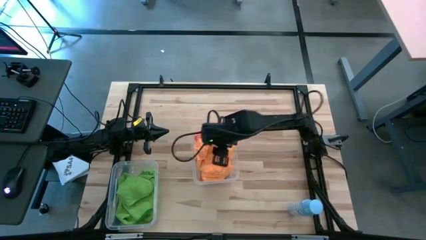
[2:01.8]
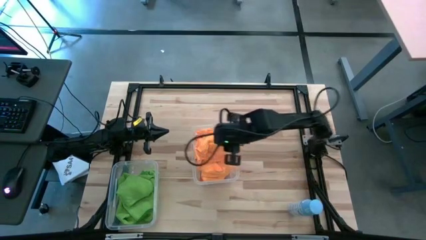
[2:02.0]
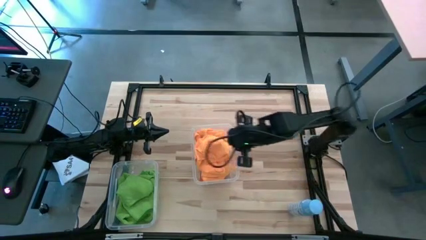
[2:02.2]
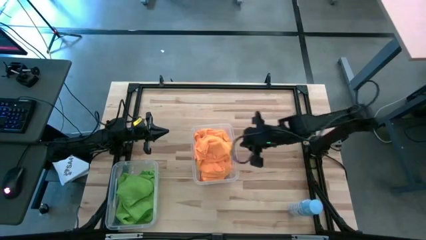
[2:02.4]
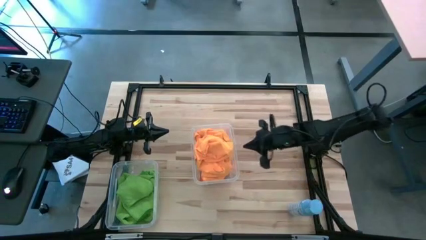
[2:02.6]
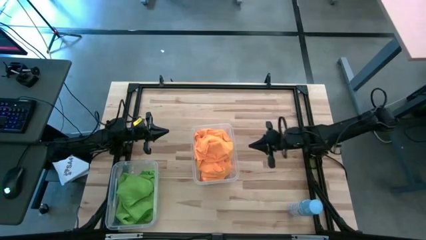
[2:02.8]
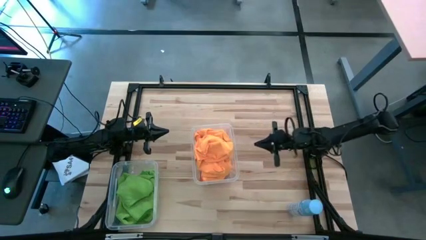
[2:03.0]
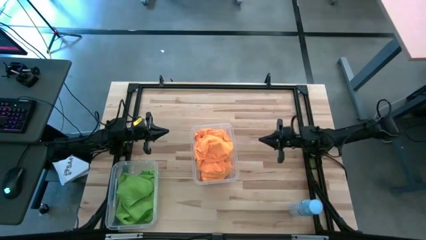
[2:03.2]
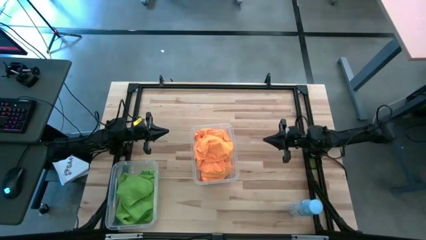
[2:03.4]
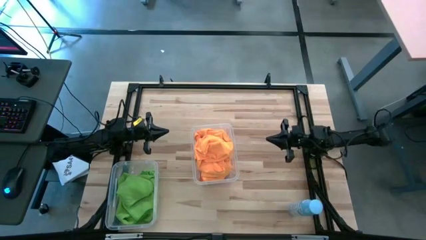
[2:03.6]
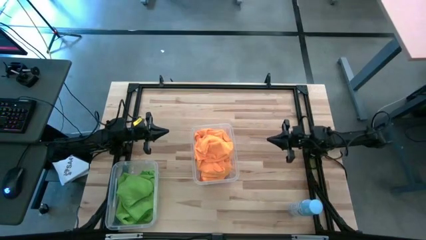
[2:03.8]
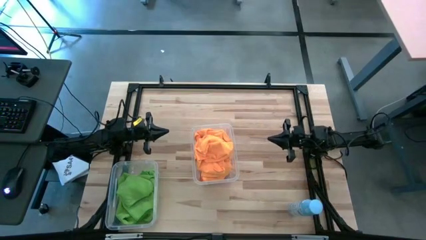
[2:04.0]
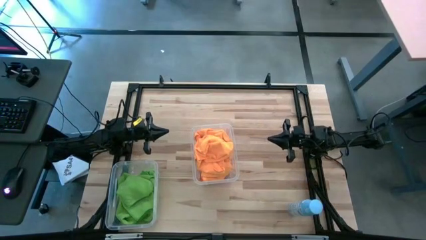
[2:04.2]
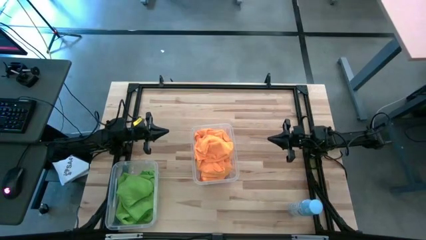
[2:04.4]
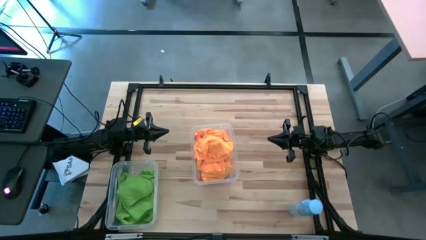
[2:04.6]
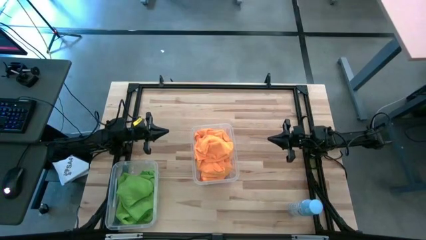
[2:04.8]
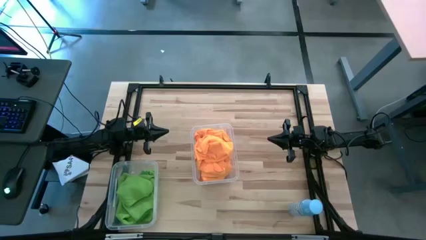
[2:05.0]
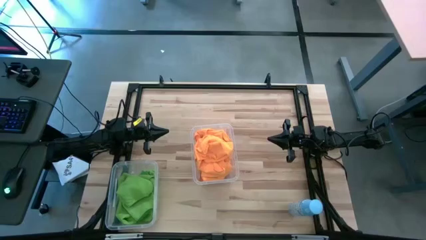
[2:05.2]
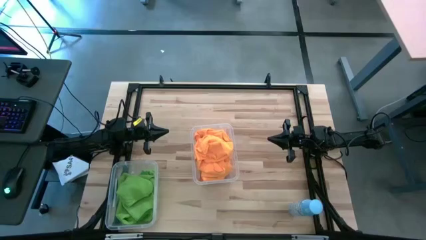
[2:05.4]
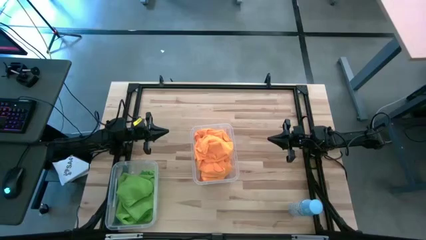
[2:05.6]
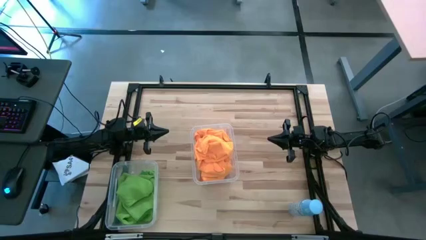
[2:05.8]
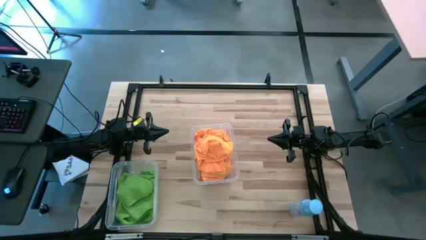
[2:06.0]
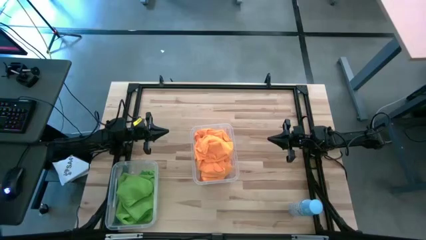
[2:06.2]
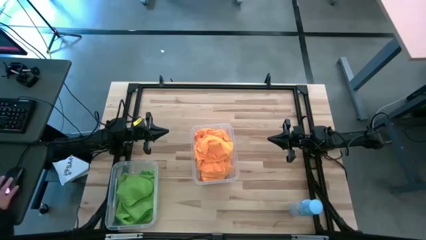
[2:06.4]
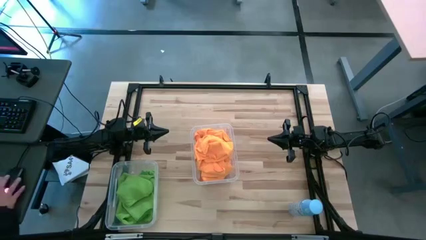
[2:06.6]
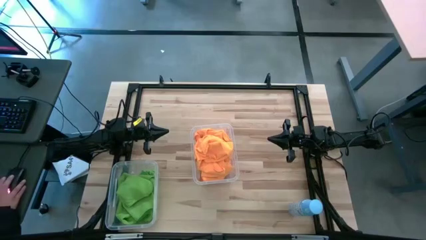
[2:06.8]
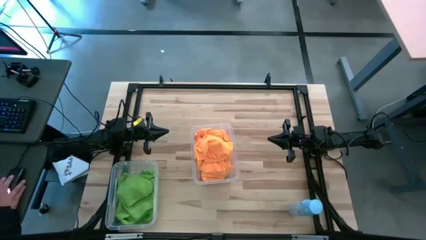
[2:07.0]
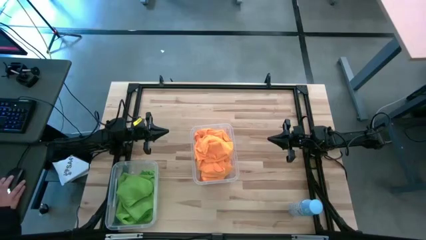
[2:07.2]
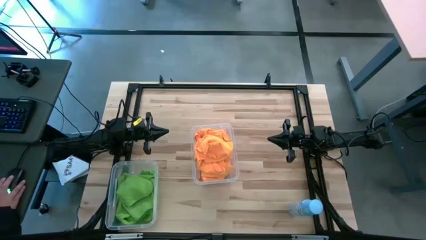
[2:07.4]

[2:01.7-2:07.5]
Task: Sort microfiber towel by color & place in baskets
Return to Home Position

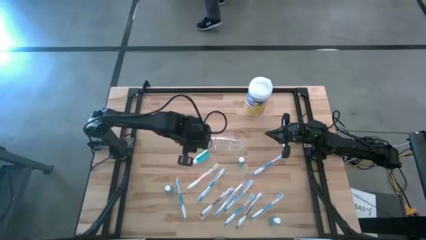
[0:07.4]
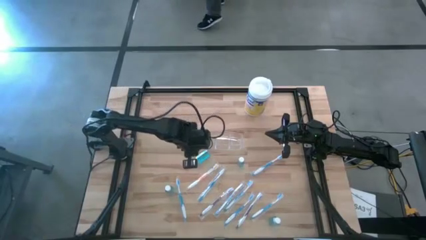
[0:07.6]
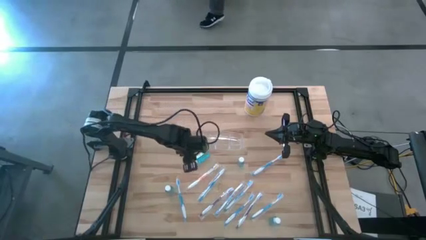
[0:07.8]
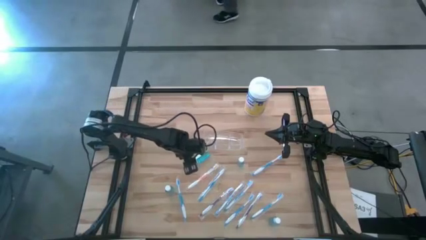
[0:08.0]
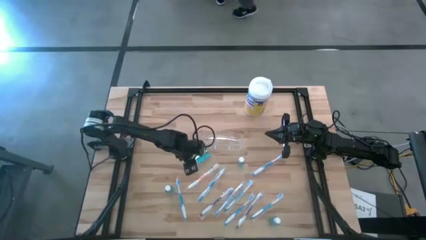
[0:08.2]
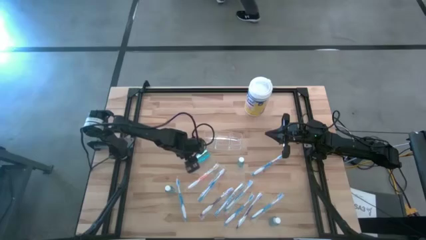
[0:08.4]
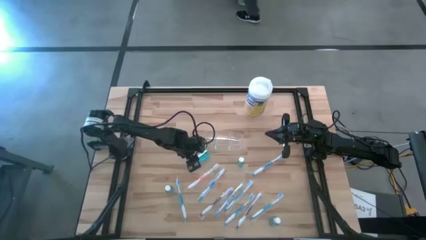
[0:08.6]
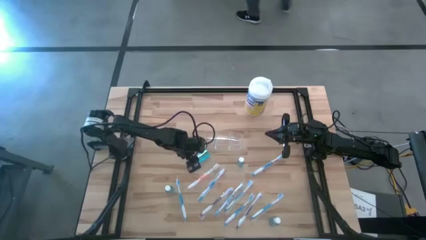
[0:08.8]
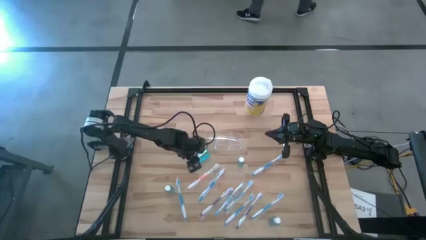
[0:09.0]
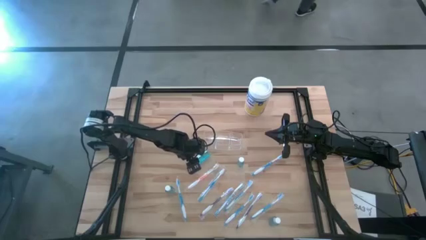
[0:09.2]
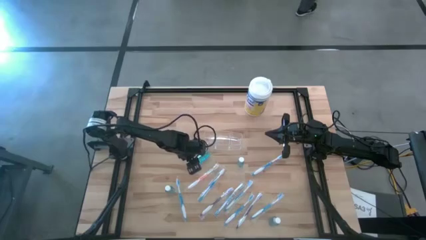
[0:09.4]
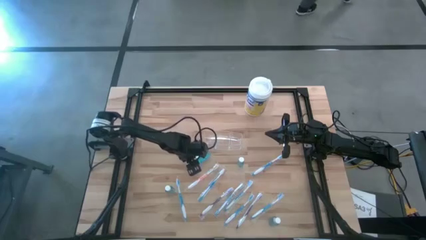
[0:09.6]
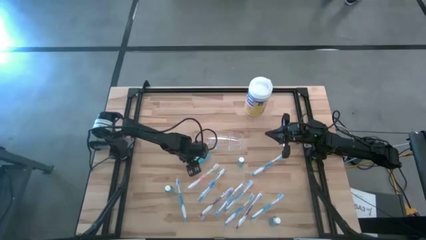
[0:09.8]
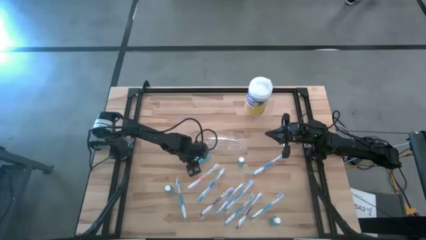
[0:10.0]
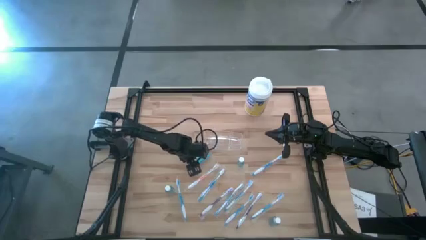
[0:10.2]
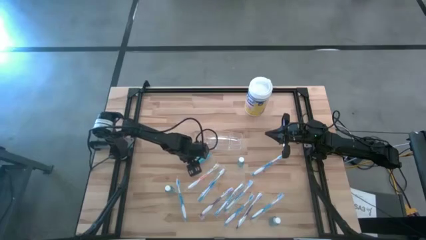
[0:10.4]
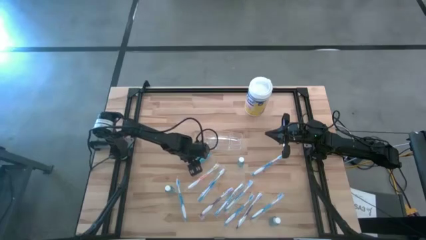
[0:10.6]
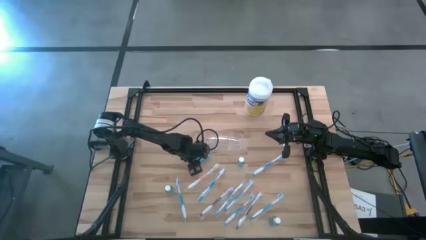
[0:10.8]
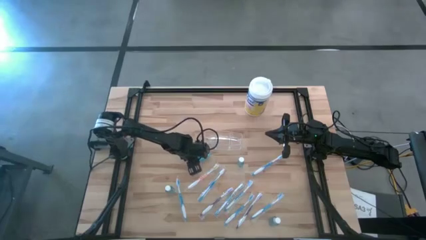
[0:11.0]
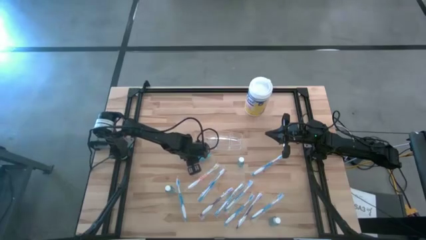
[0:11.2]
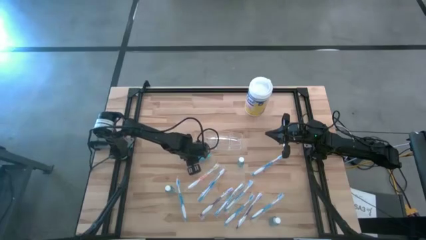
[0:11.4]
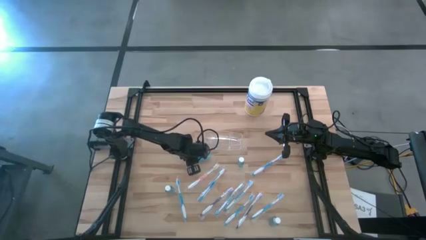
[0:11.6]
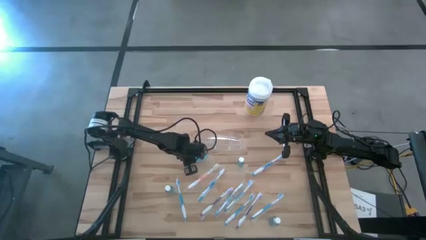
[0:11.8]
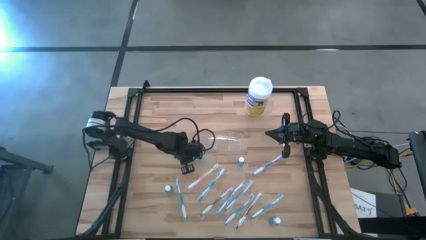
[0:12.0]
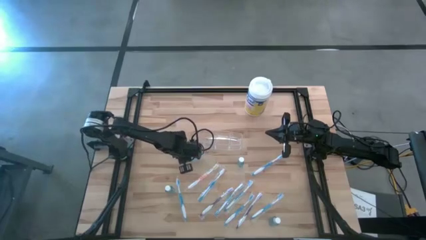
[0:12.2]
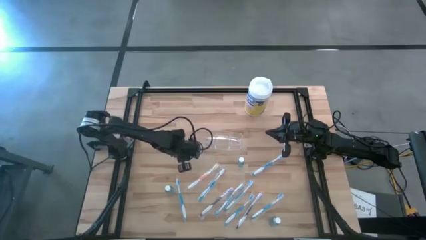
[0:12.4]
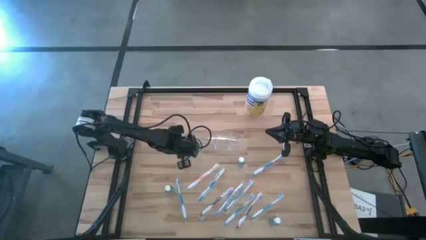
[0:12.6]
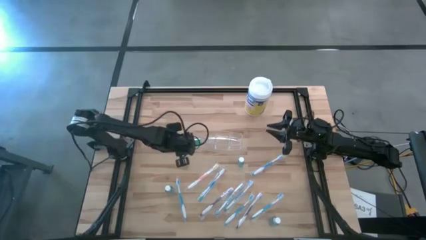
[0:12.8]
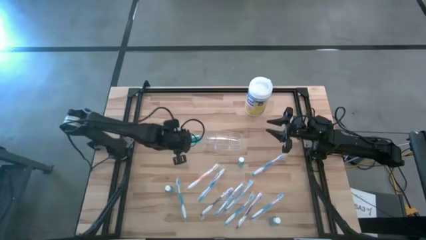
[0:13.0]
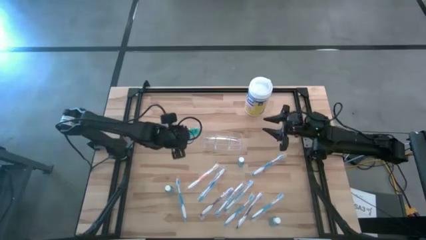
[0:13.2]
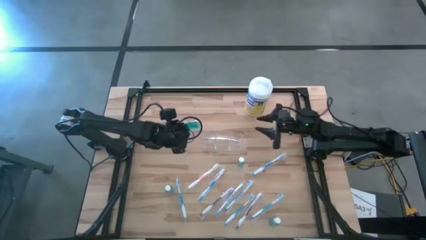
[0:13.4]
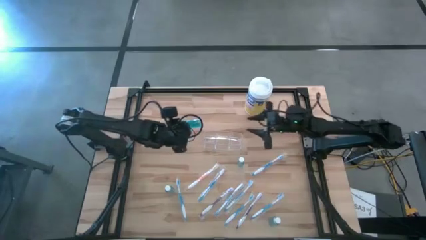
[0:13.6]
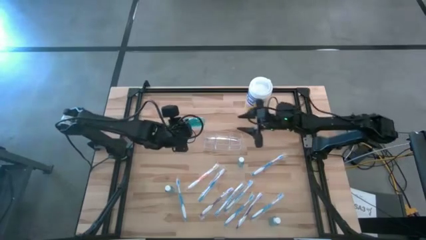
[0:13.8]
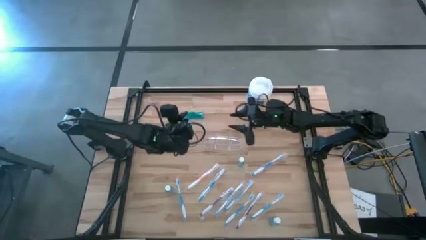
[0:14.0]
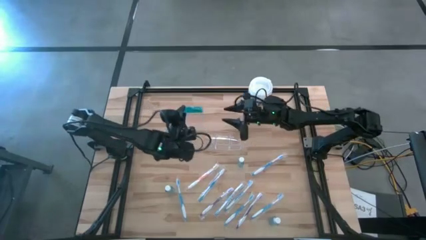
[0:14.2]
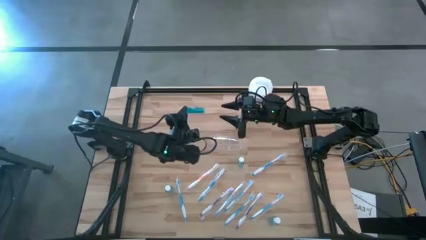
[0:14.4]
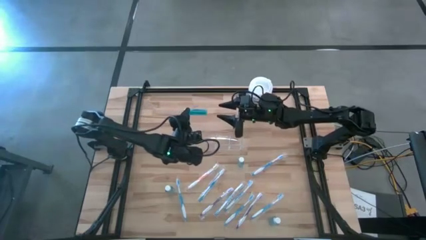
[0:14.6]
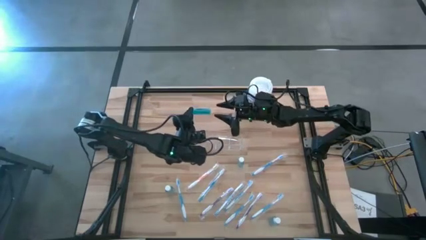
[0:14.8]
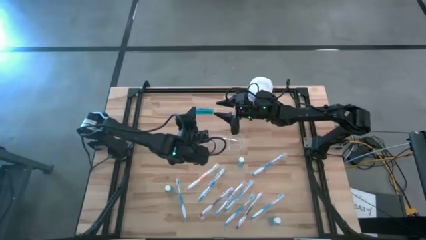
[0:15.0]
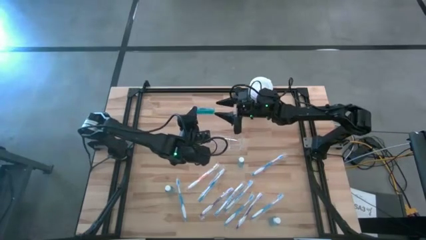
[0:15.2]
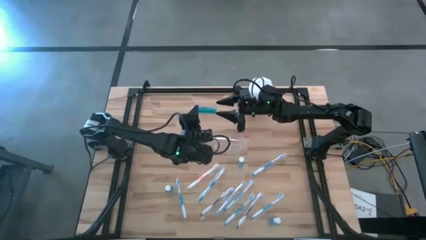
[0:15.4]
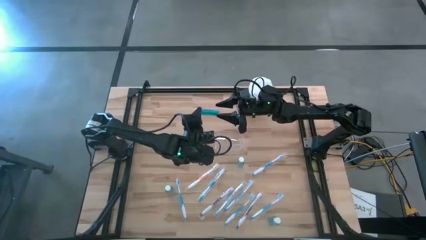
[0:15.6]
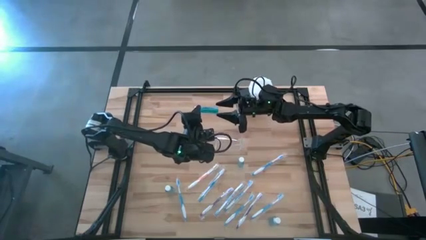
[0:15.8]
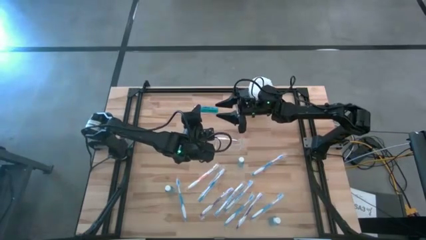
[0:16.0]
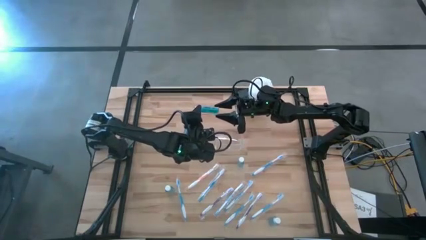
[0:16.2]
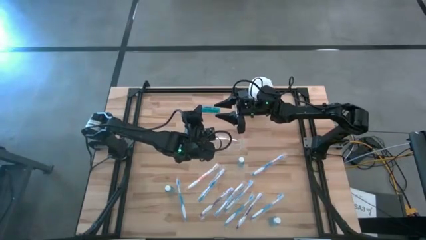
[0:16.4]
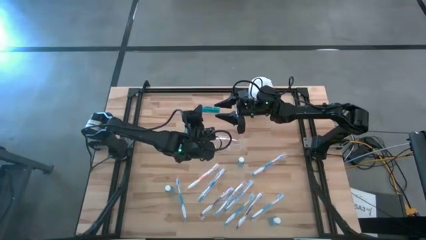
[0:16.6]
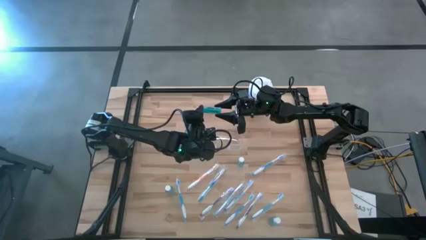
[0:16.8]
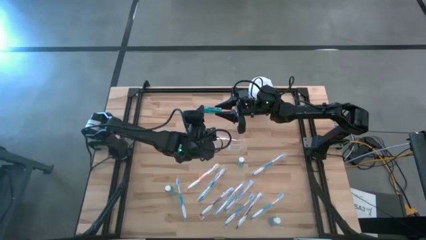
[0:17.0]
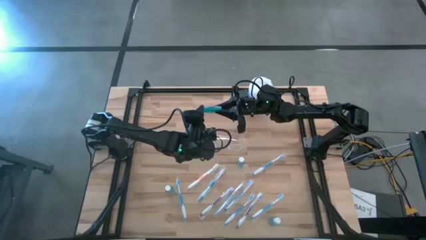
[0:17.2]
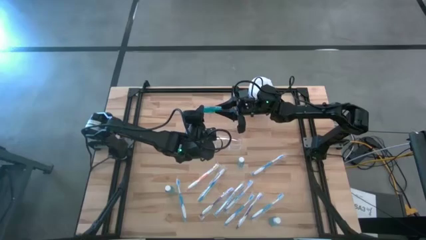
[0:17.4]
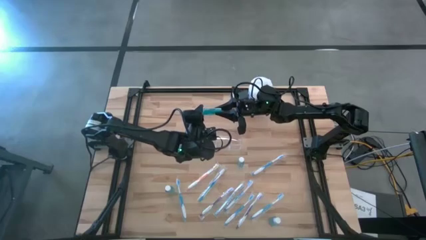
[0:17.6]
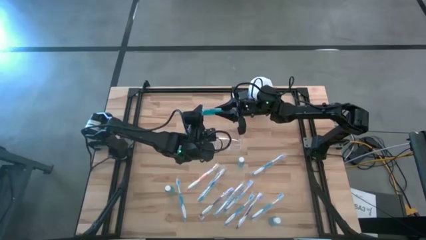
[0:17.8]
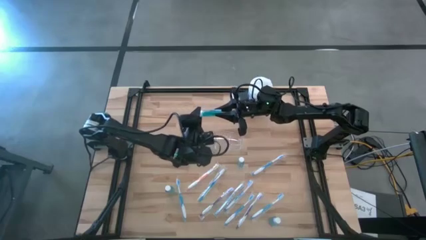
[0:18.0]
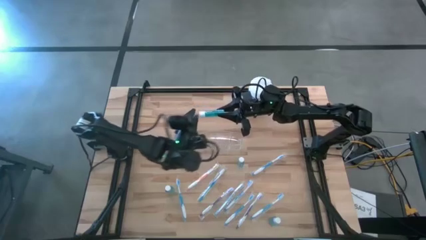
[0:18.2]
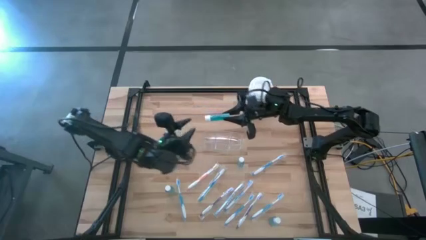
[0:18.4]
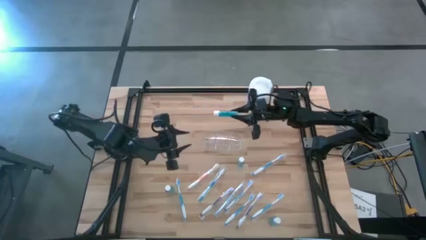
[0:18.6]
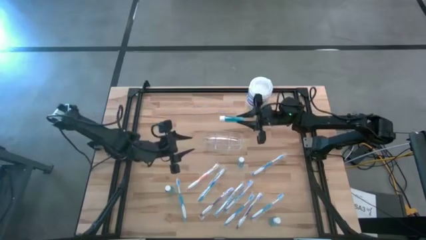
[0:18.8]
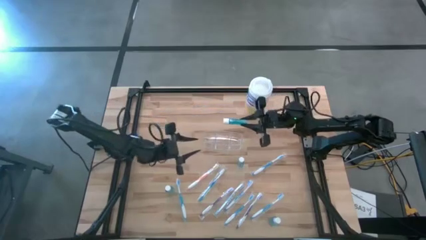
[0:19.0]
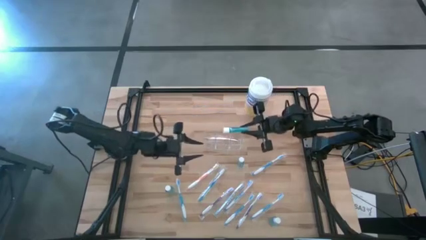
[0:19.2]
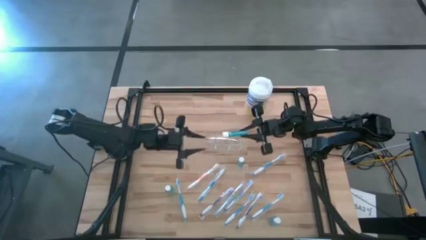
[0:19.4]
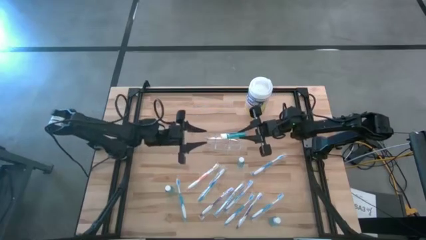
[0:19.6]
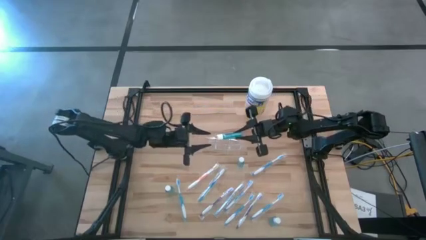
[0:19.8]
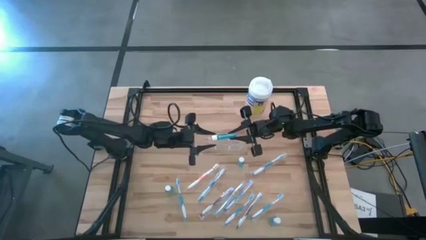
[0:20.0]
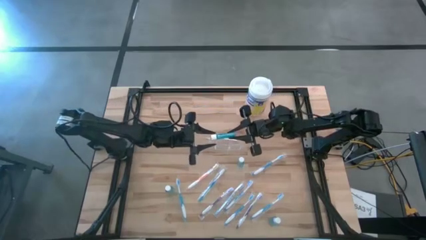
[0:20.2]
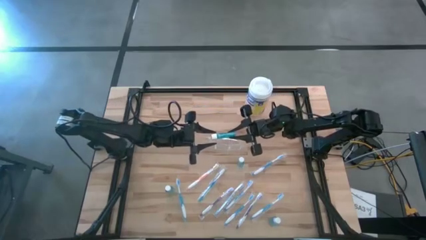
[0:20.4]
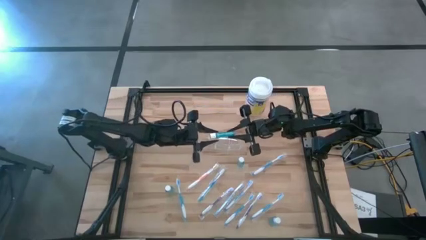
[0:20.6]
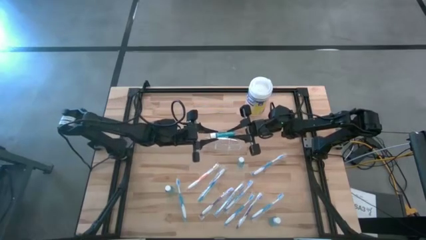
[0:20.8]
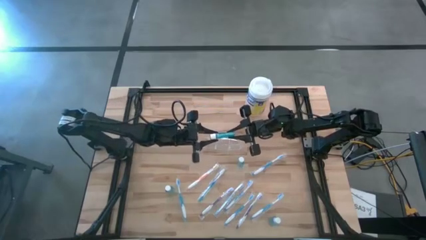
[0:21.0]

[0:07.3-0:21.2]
Task: Pick & Place toothbrushing station
Put the blue mouthwash into the transparent organizer
